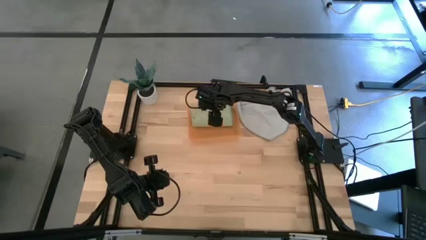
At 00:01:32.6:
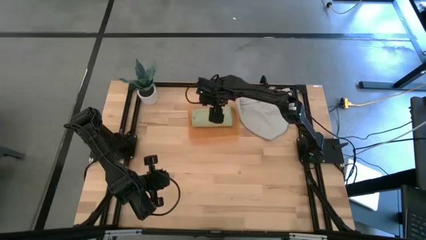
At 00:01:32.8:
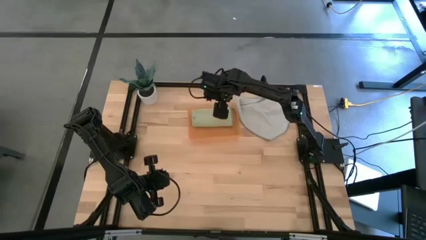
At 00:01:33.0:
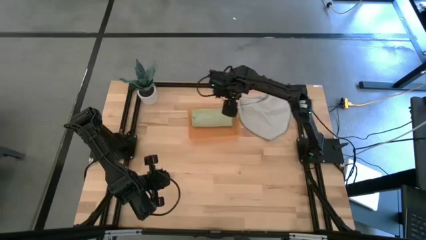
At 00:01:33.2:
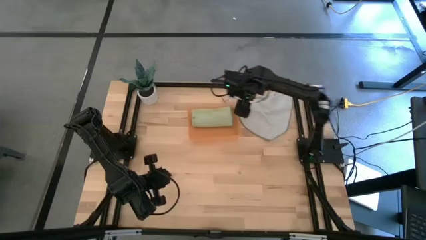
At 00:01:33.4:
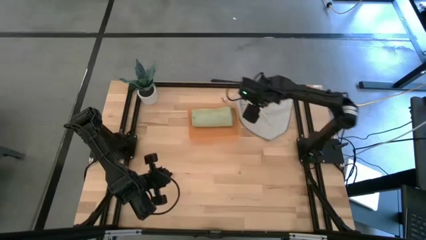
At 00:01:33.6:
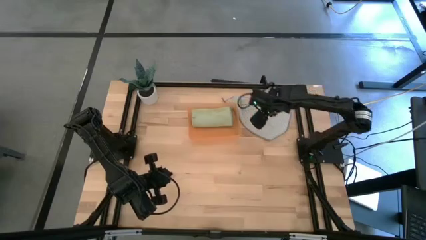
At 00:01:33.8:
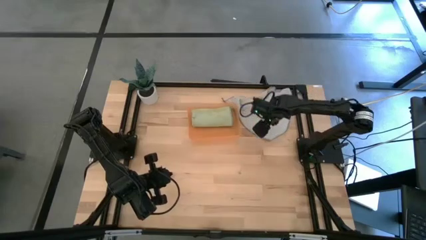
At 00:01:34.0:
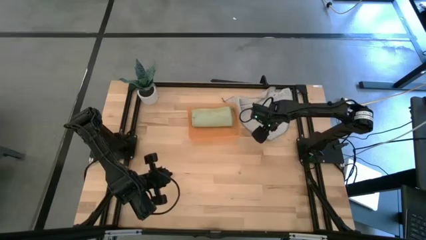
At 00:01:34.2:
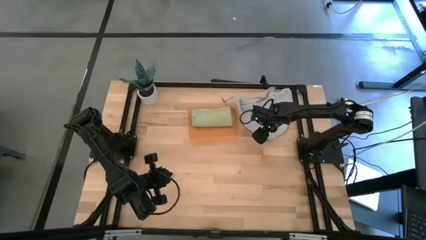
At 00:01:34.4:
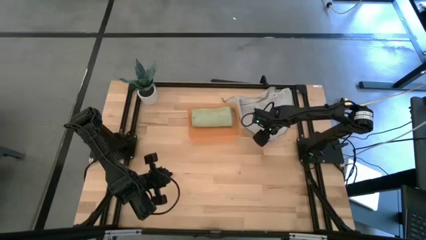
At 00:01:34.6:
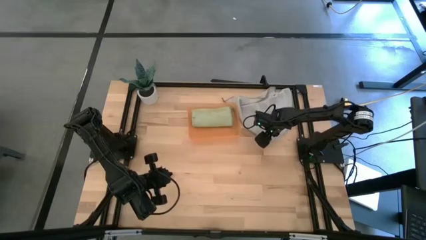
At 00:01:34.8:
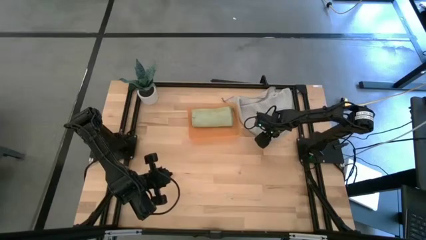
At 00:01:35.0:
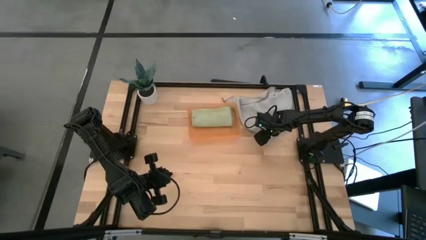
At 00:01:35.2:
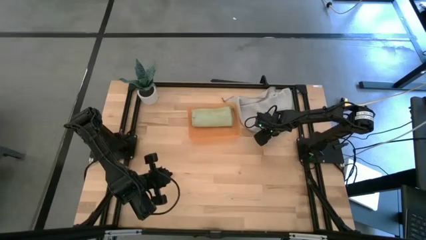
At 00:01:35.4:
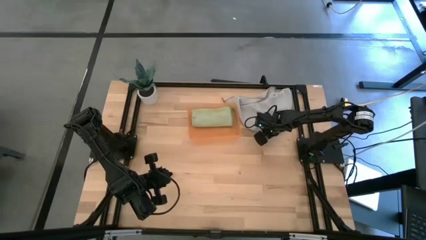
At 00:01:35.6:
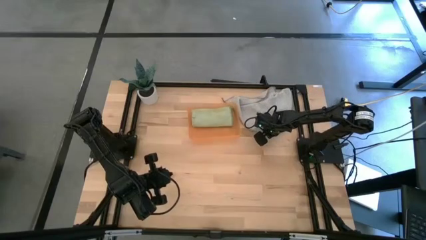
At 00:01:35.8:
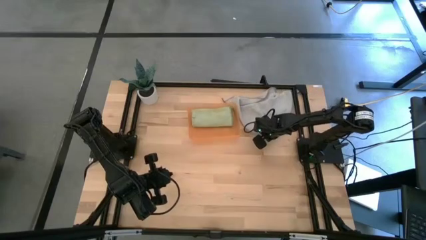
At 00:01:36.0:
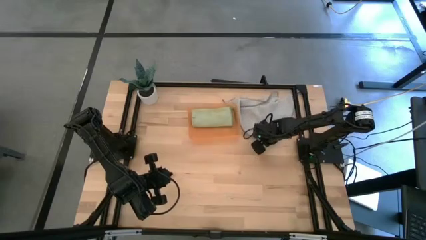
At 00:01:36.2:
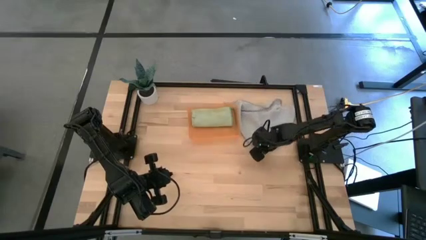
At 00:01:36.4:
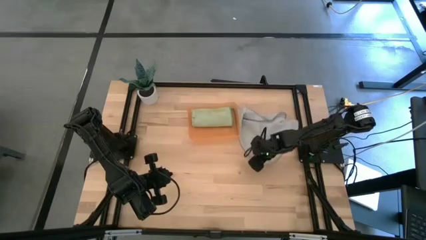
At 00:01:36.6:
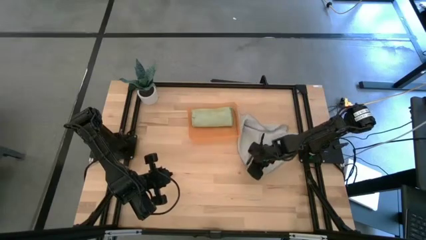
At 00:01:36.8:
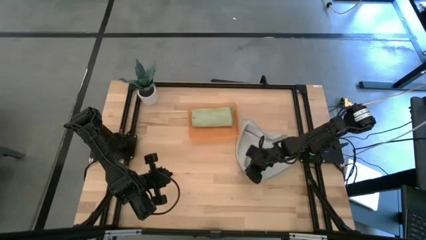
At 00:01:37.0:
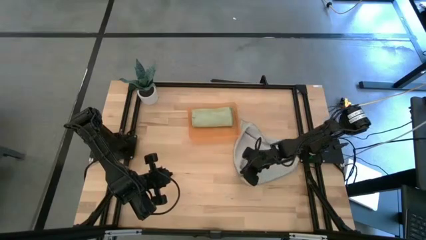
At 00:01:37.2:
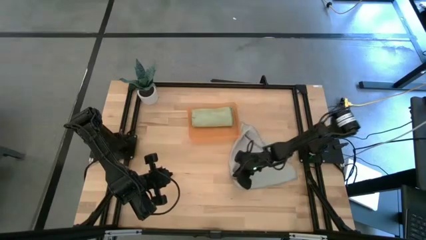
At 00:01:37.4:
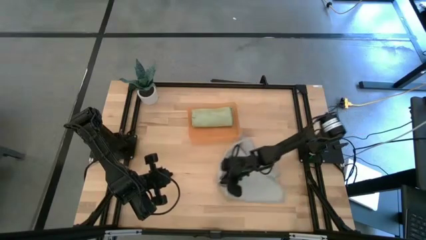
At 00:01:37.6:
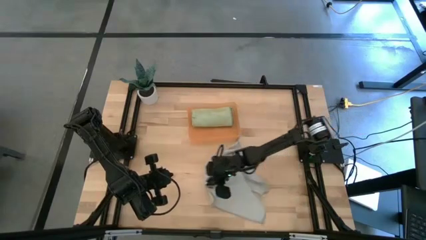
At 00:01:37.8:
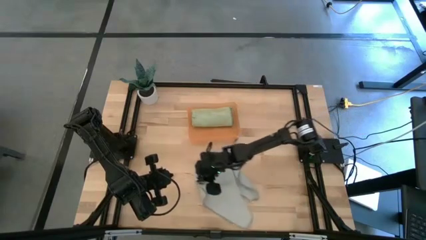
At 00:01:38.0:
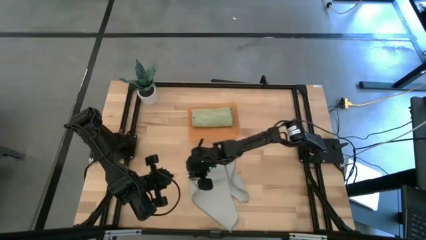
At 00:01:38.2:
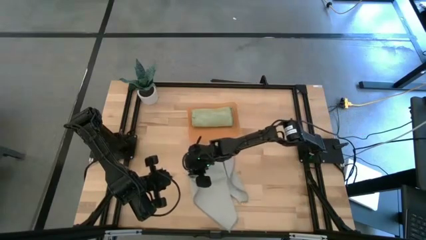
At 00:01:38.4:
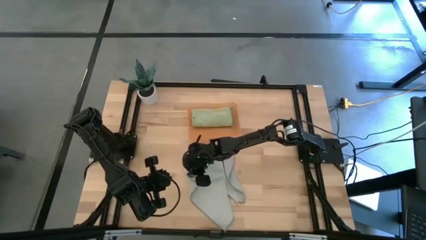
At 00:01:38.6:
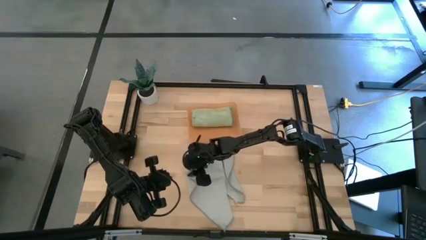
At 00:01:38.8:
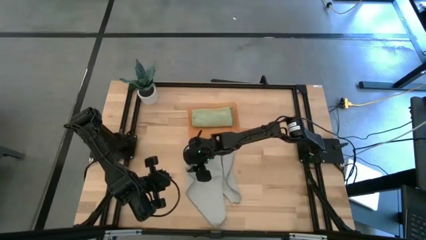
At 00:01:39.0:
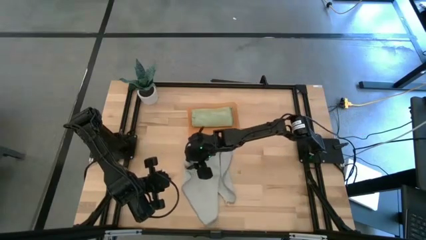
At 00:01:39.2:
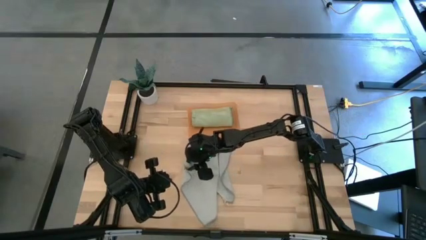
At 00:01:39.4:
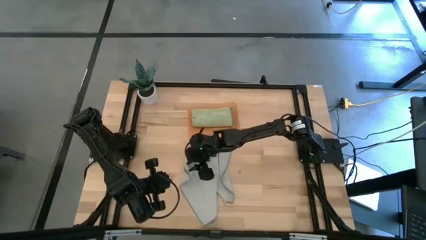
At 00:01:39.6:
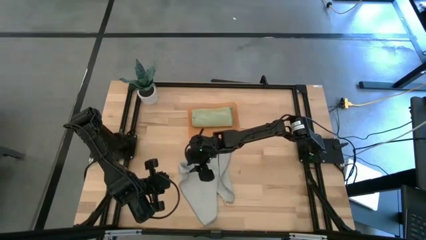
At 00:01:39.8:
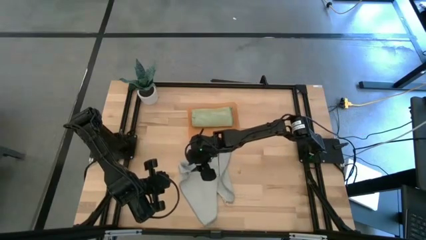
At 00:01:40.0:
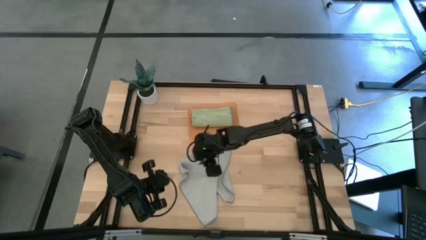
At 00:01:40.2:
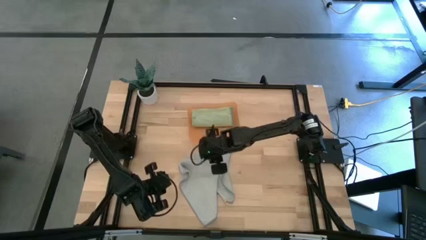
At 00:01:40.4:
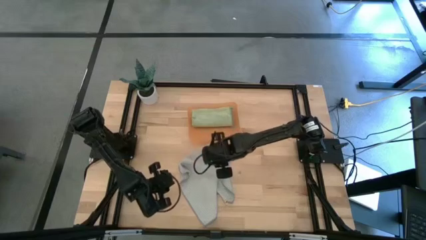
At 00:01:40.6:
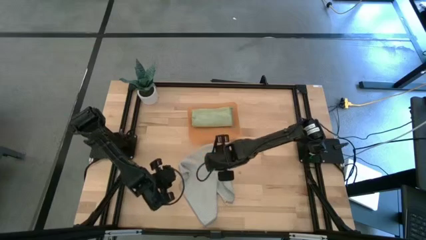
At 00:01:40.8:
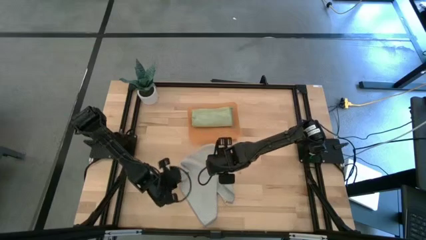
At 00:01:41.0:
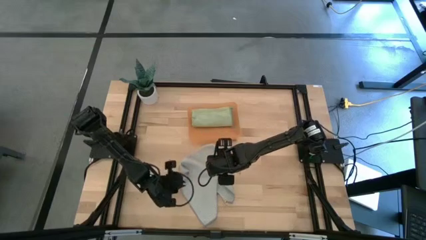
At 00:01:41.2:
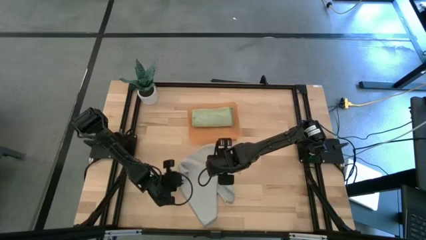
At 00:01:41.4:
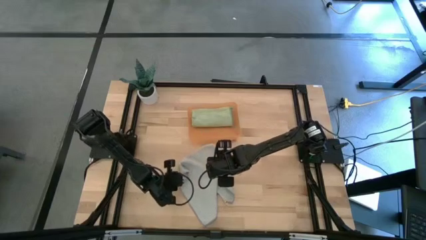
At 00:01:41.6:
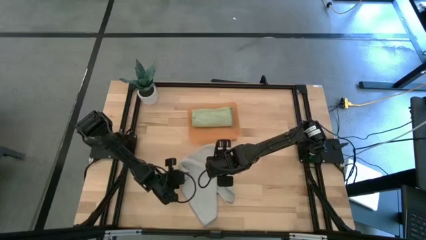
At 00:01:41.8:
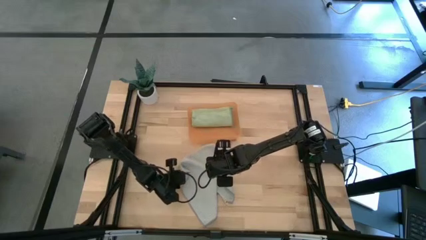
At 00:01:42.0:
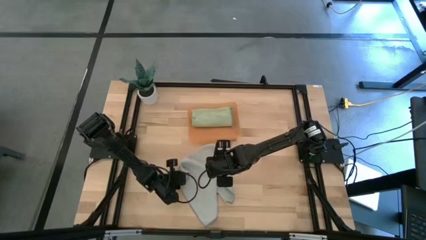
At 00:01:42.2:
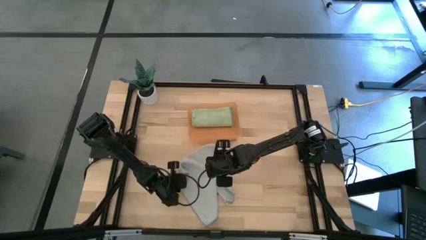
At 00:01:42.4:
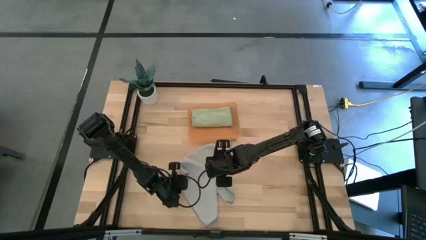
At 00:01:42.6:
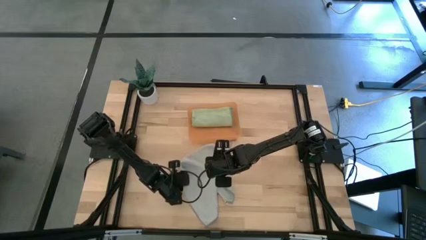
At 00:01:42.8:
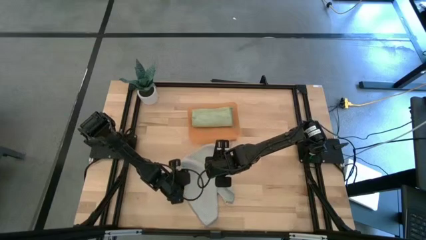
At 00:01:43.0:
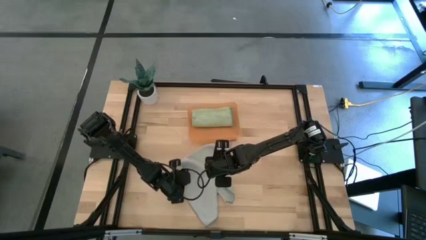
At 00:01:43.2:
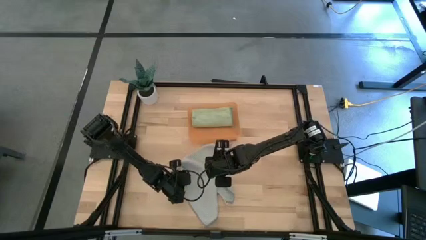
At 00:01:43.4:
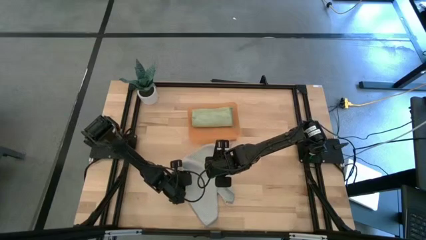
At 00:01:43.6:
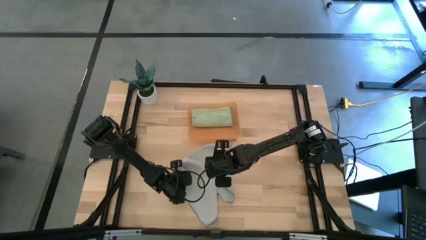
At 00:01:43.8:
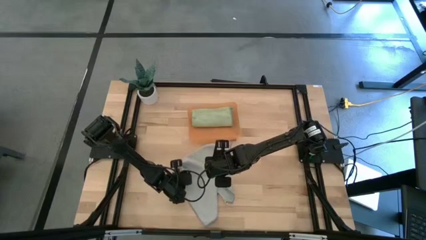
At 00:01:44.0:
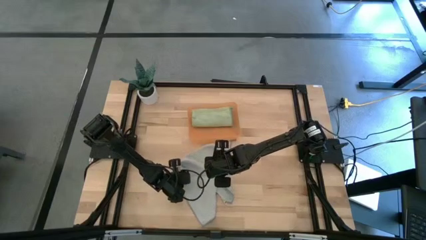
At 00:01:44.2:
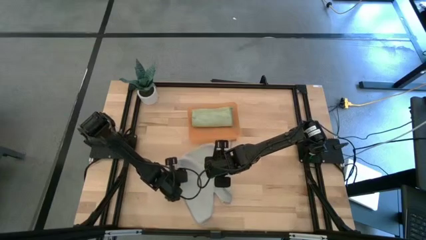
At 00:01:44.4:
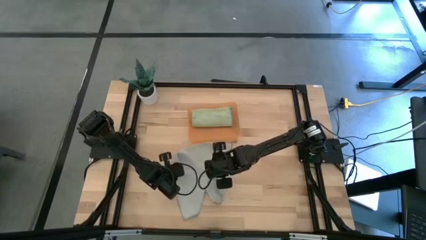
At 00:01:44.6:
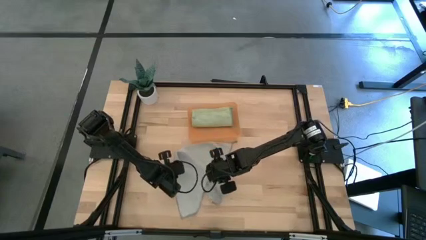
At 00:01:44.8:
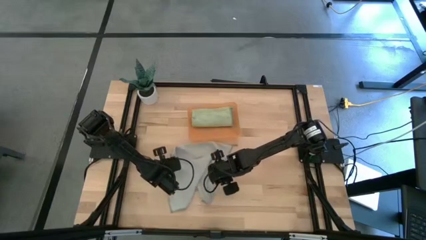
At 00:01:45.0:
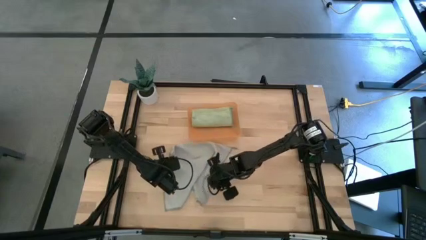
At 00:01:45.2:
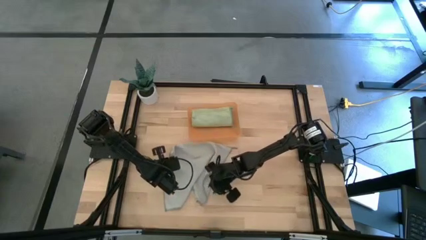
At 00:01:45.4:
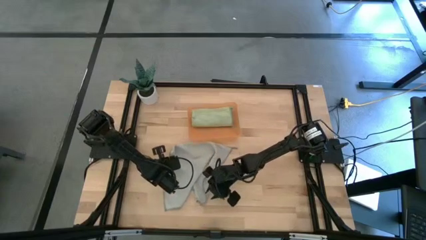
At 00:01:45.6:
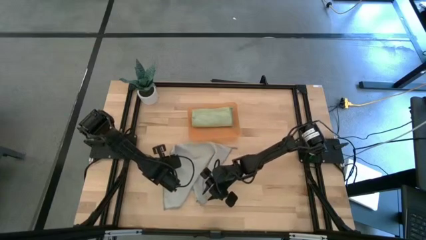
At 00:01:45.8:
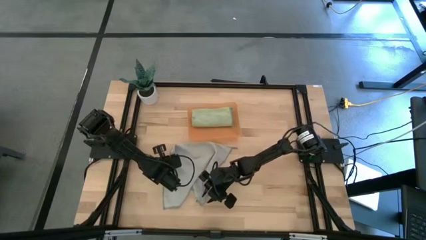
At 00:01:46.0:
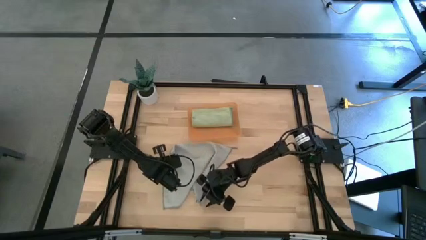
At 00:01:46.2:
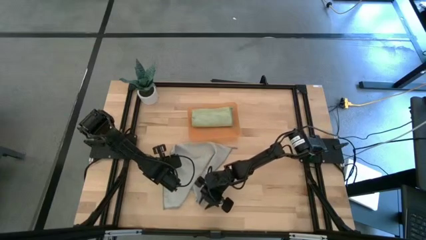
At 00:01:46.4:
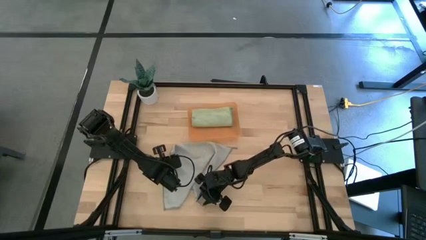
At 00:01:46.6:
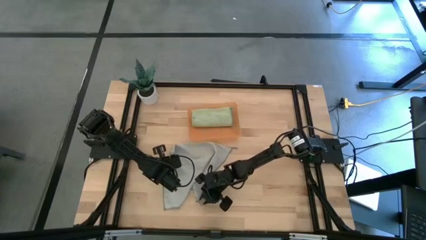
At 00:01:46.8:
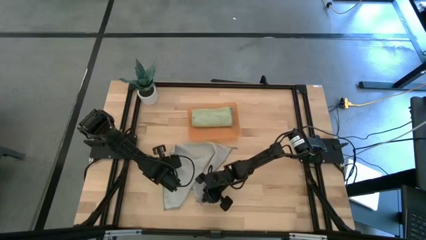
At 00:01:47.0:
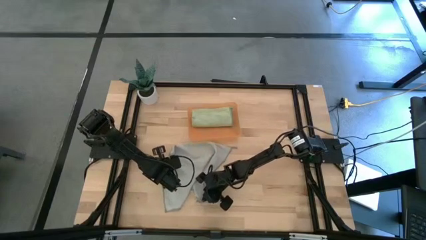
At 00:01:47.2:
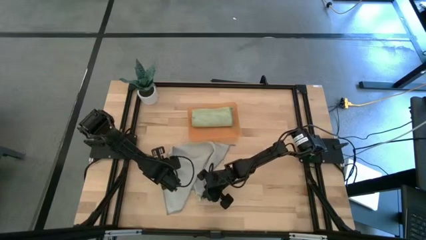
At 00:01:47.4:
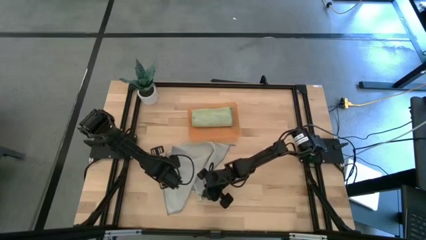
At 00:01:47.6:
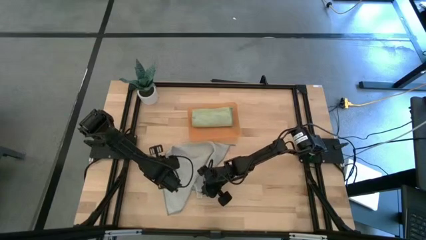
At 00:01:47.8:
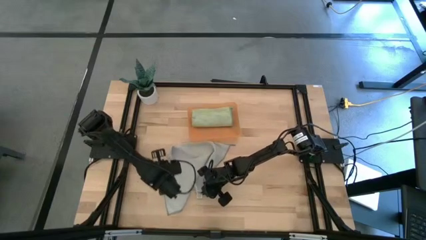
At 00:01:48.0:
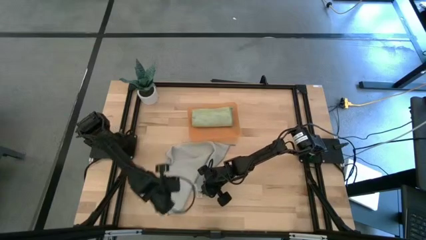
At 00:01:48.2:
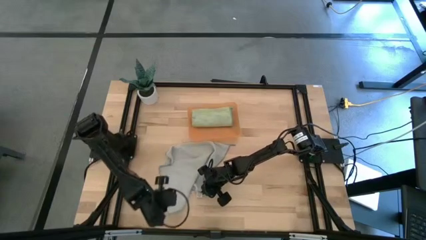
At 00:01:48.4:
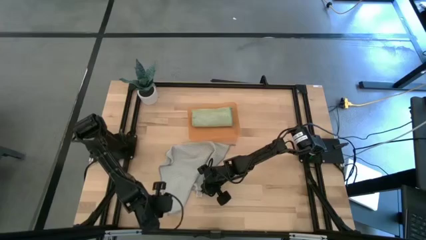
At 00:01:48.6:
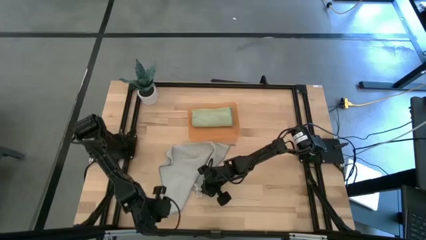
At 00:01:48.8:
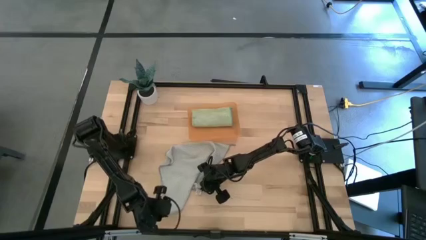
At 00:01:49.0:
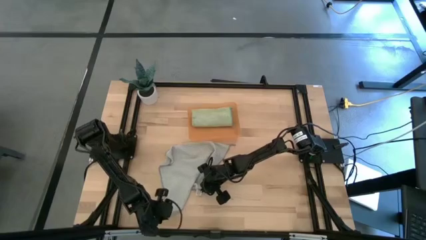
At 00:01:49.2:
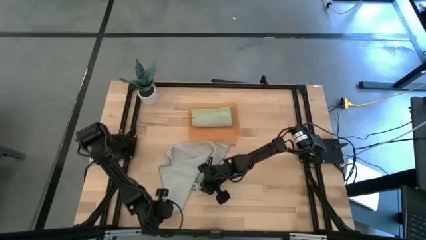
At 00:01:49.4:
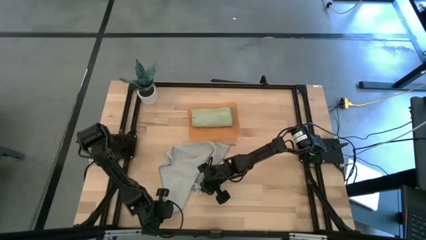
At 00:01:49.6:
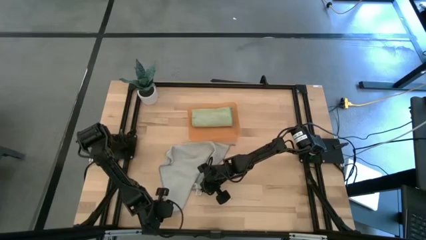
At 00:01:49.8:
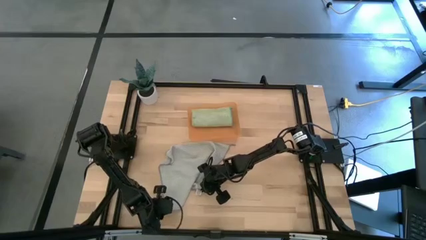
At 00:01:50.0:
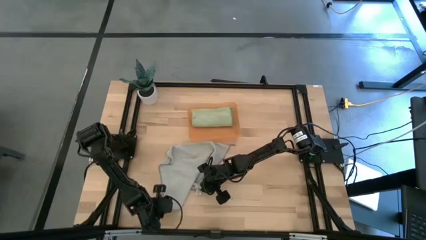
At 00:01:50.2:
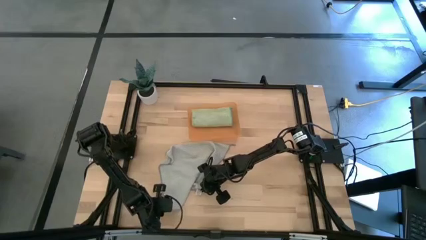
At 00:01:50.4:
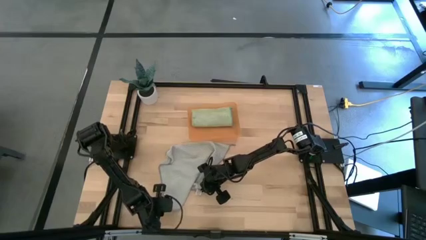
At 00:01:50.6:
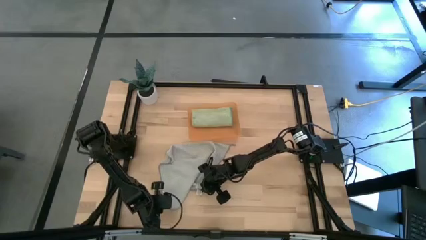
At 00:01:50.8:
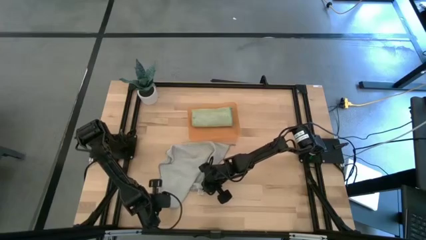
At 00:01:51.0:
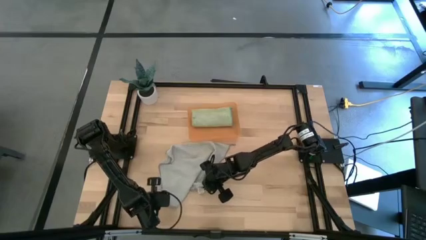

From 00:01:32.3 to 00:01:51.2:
Task: Roll microfiber towels into tight, uniform cylinder then place into a basket
Fold the gray microfiber towel
